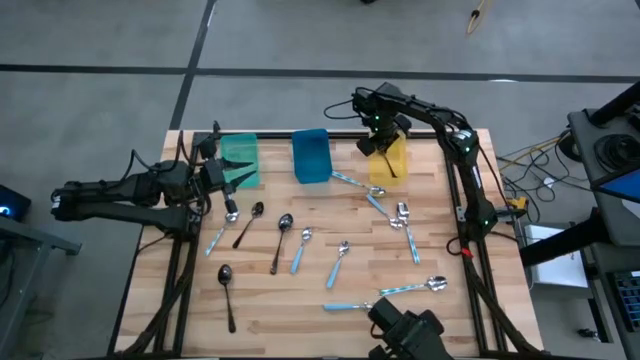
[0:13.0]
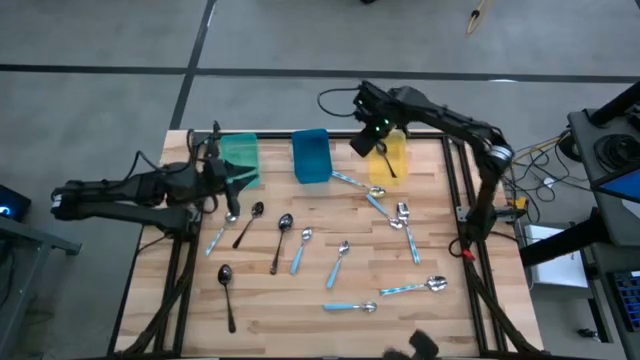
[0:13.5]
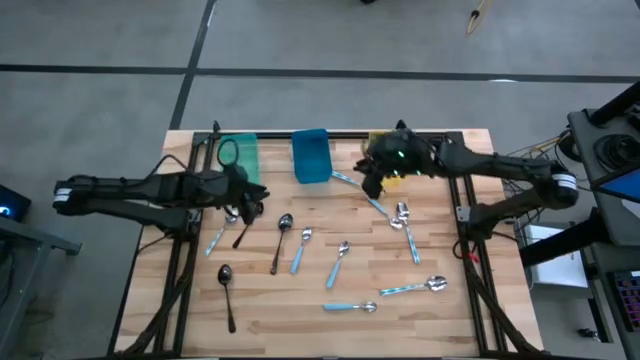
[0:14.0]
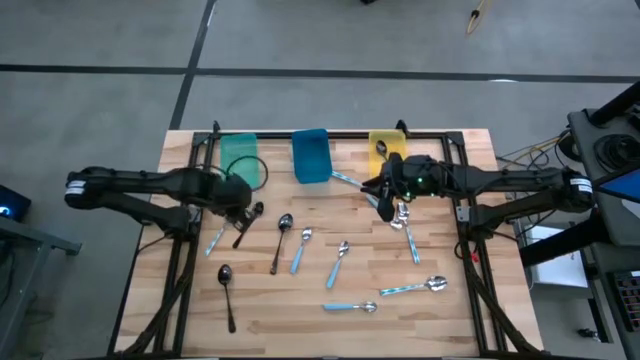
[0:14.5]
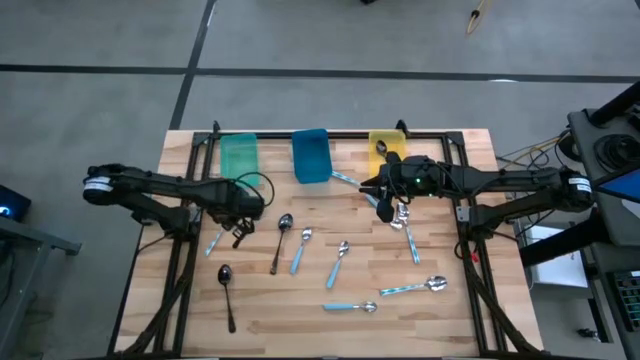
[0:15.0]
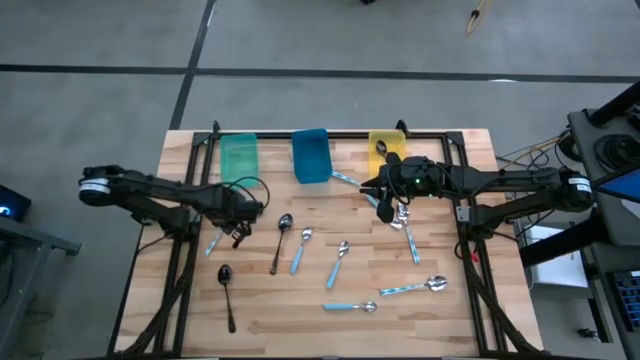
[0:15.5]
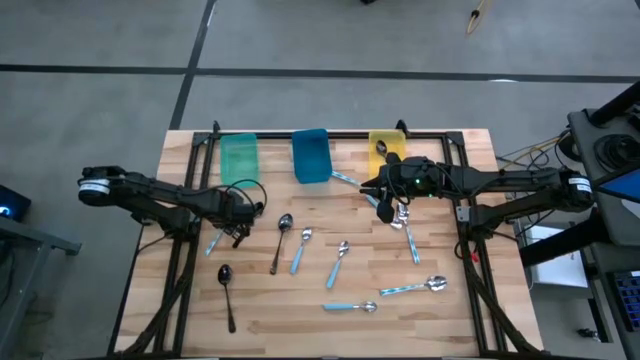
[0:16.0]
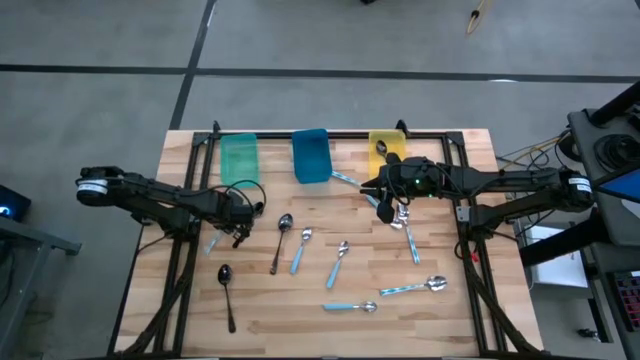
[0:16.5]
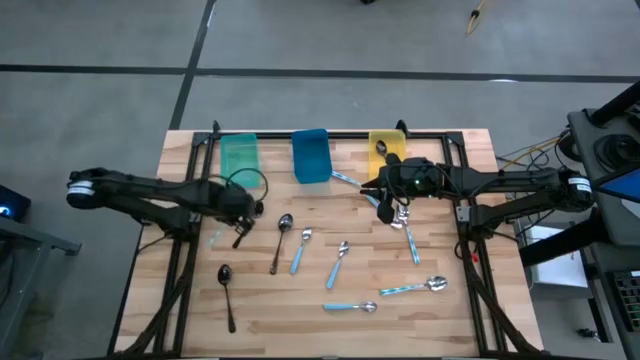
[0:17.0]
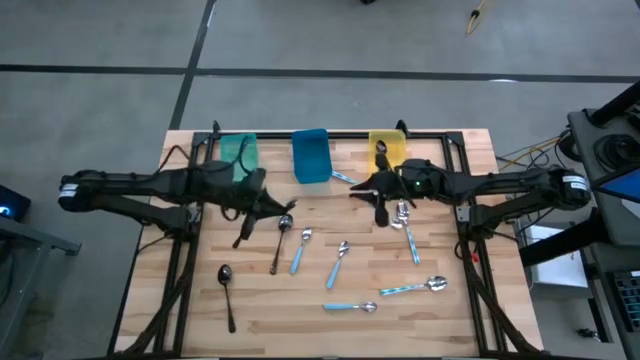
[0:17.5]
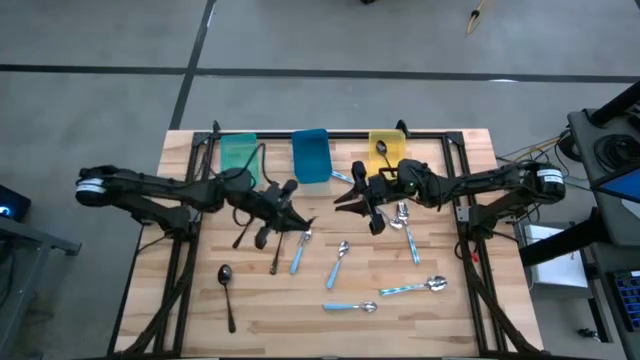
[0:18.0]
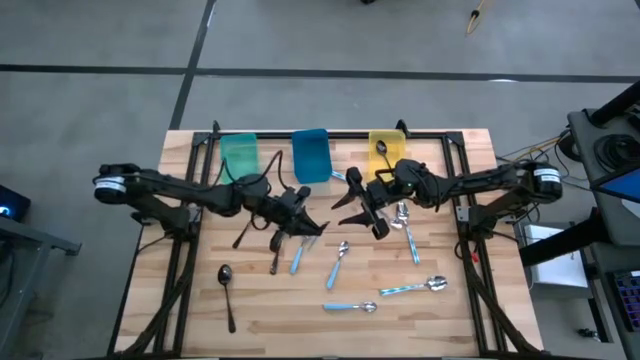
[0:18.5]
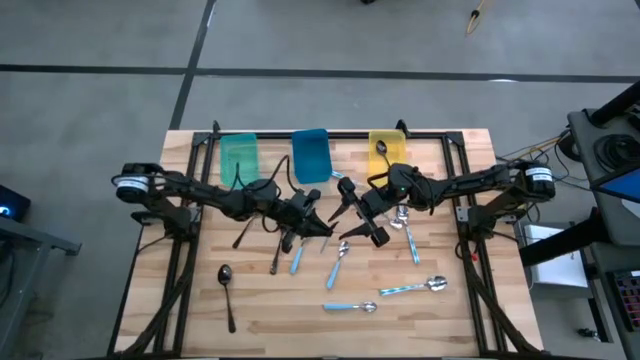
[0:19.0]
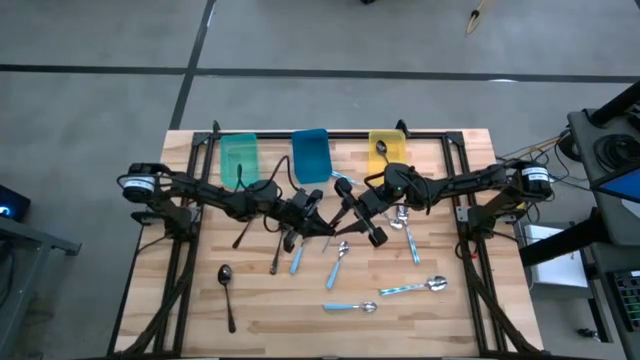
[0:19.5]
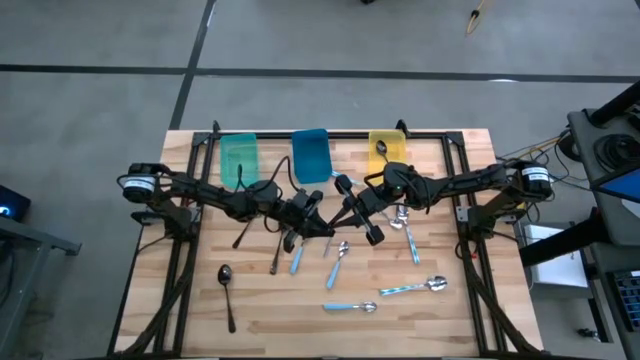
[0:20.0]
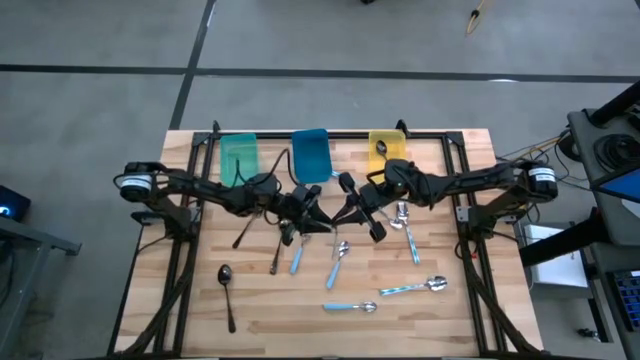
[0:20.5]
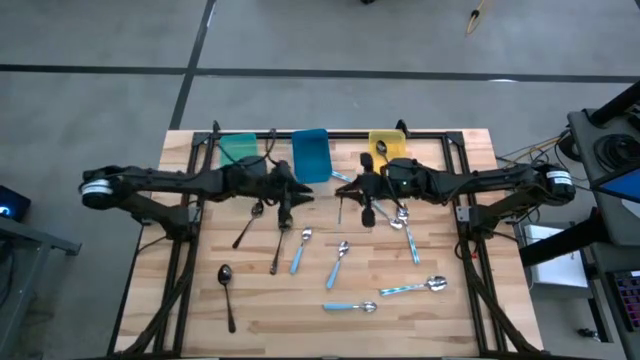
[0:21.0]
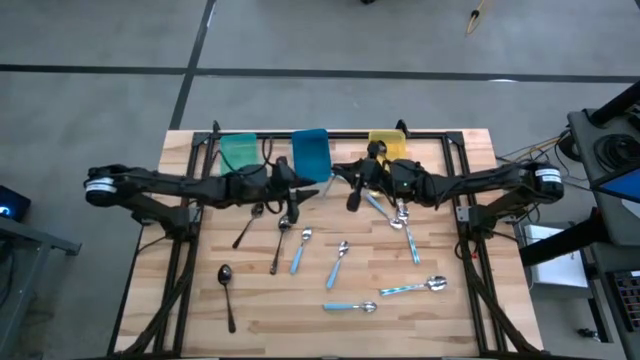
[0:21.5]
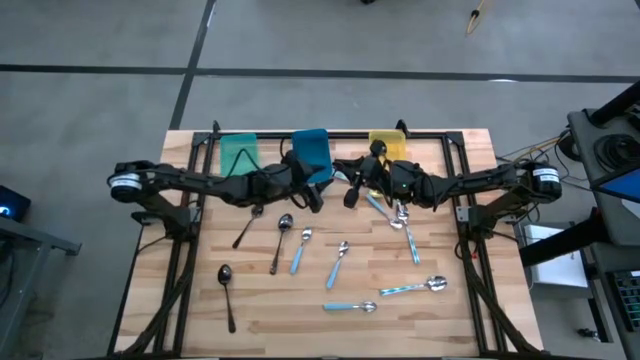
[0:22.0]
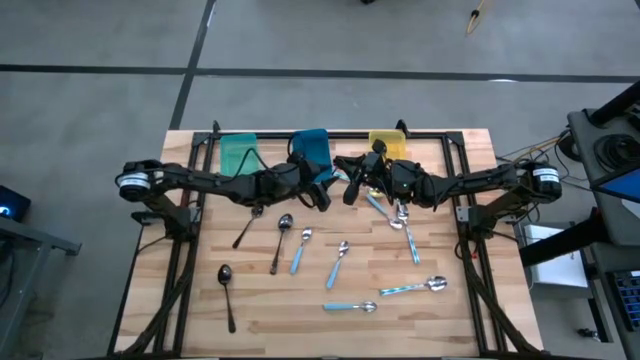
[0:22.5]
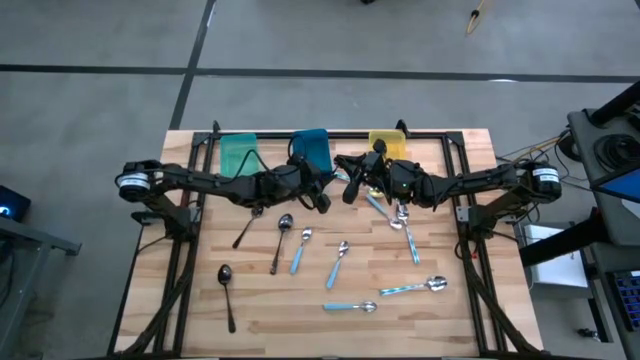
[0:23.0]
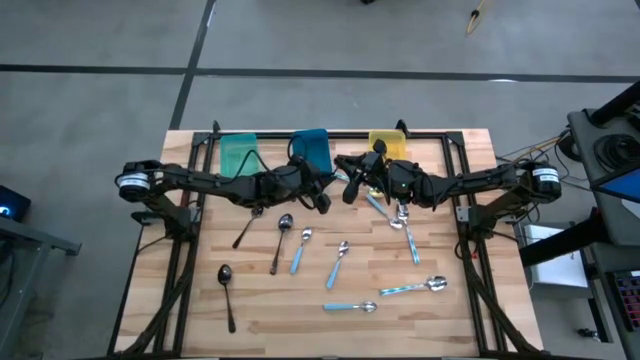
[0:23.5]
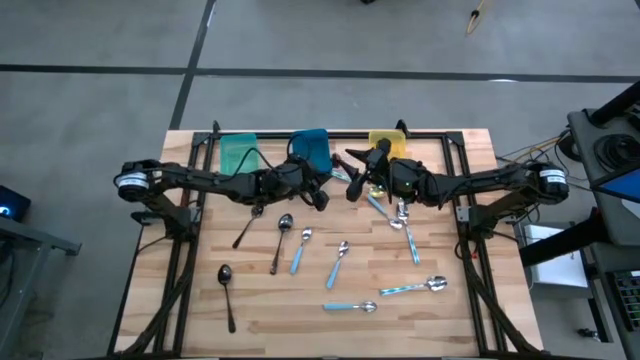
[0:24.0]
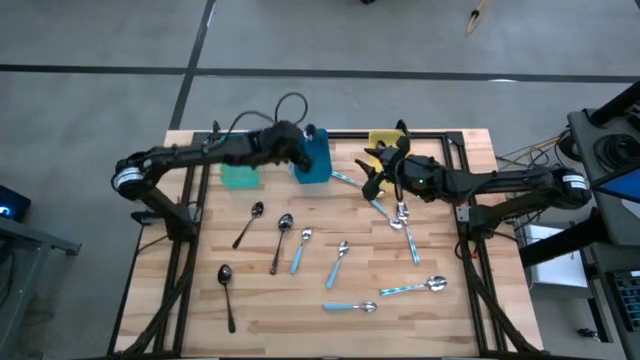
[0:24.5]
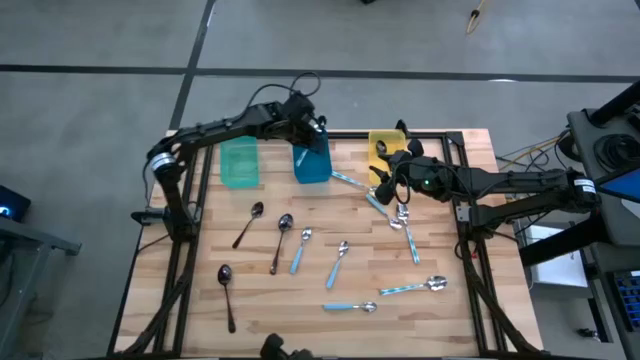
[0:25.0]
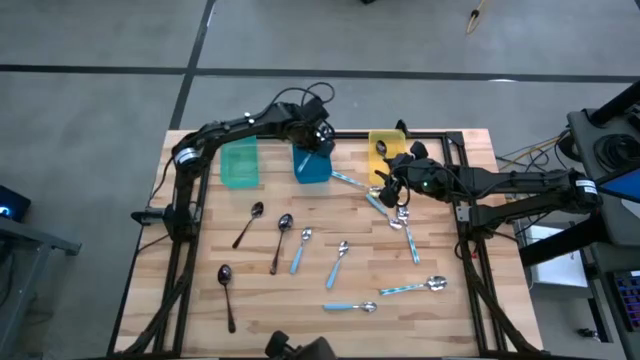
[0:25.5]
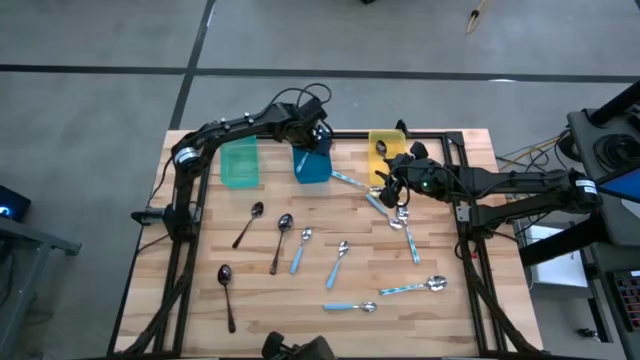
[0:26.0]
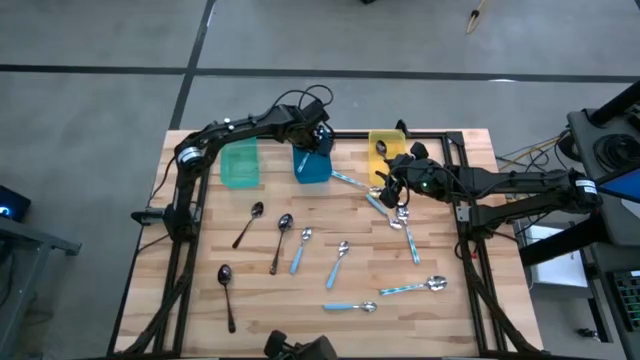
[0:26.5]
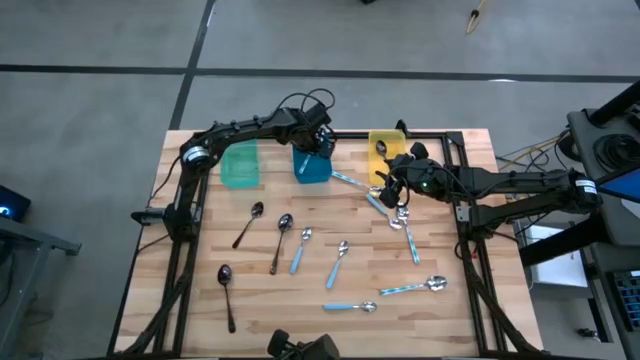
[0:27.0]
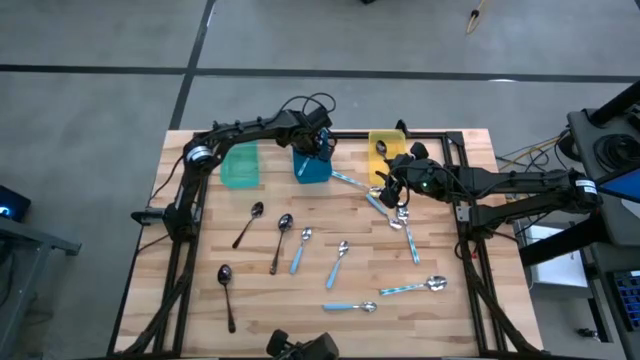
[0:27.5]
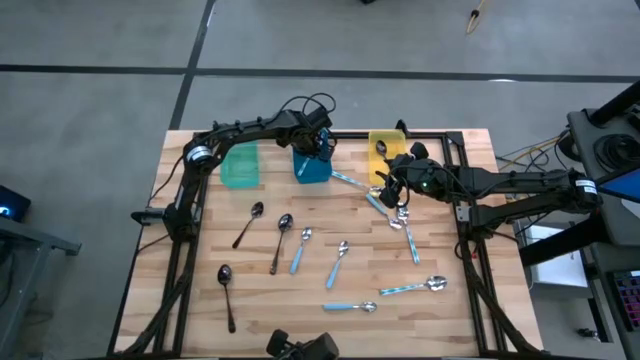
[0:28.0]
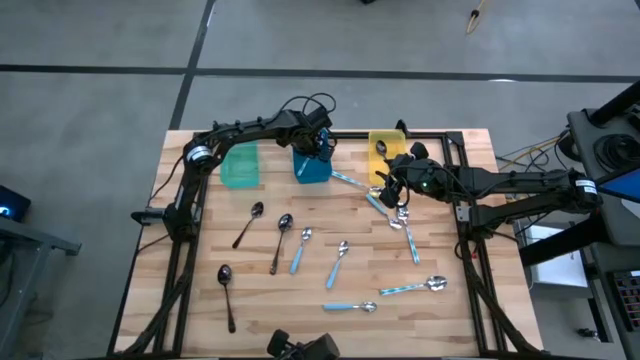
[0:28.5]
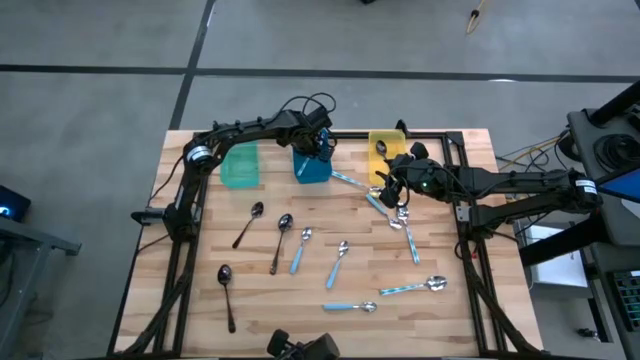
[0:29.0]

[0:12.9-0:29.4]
Task: Sort silverware by color (type)
Put the white-blue spoon into the blue bin

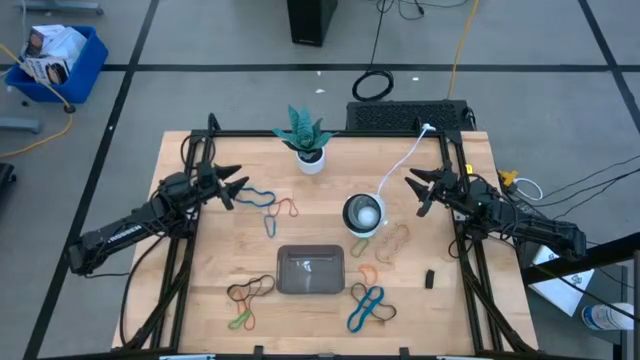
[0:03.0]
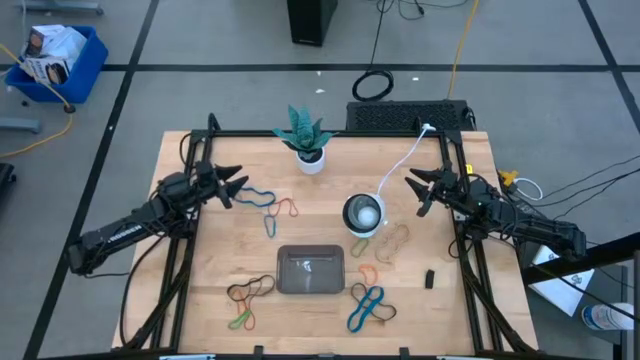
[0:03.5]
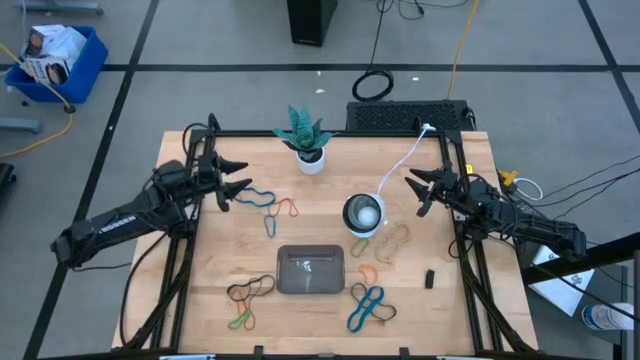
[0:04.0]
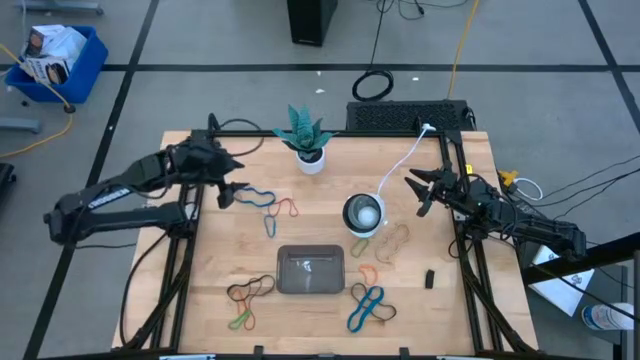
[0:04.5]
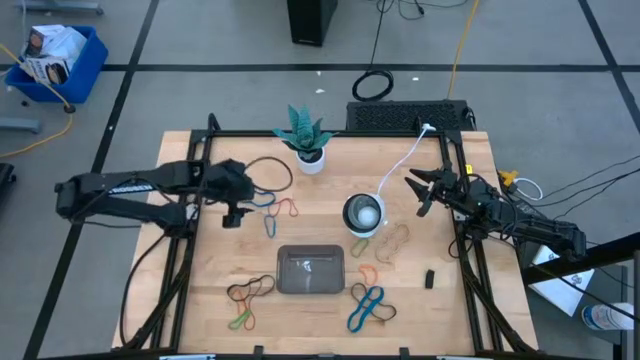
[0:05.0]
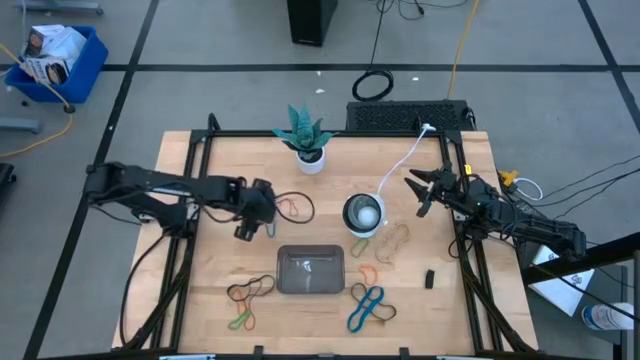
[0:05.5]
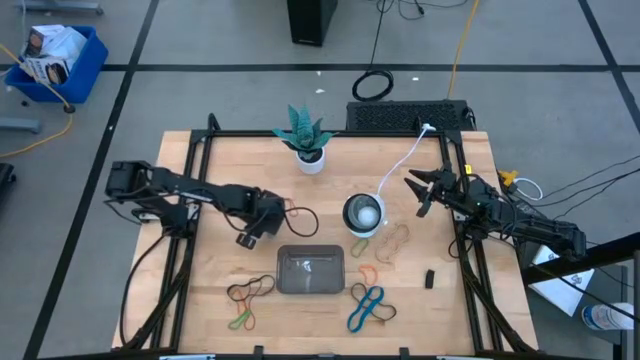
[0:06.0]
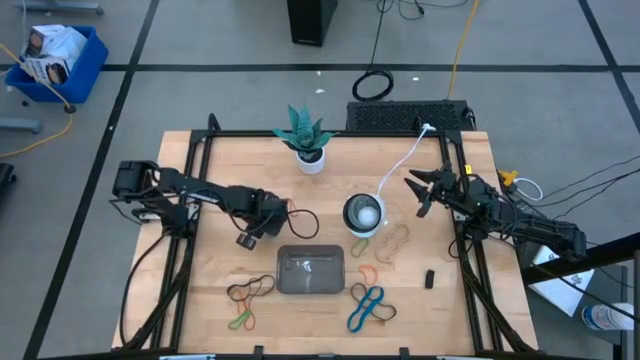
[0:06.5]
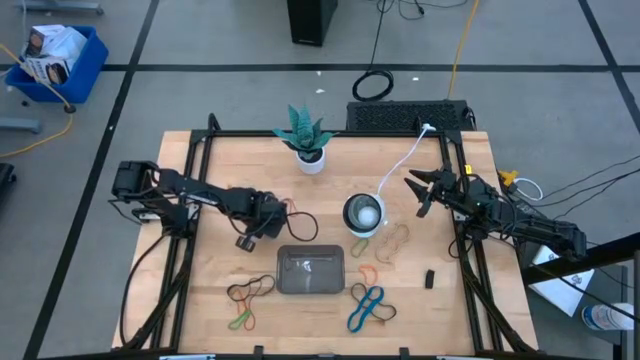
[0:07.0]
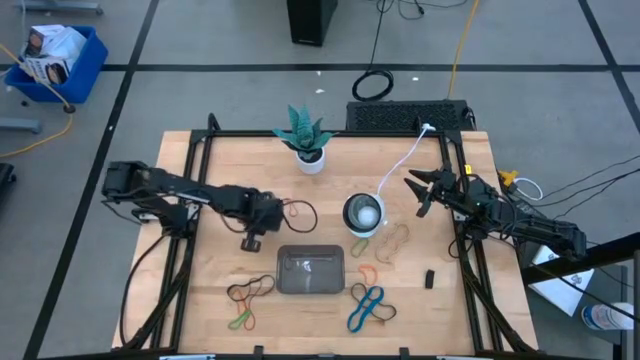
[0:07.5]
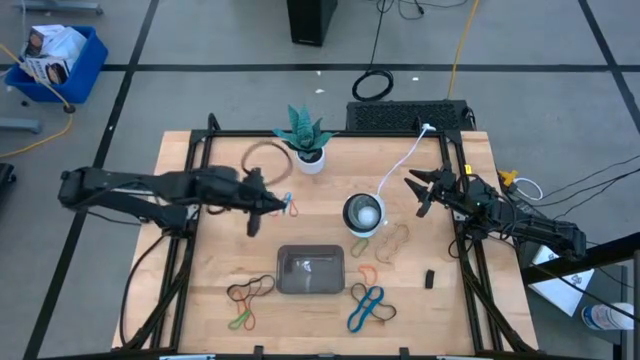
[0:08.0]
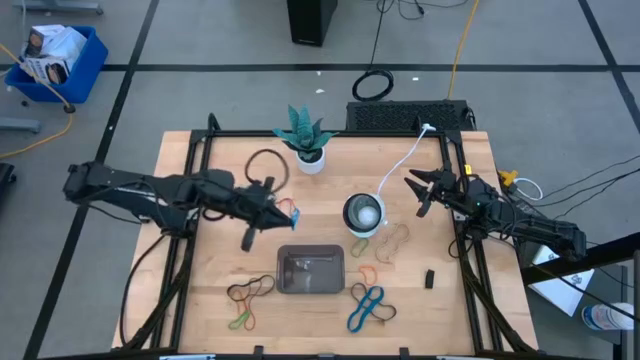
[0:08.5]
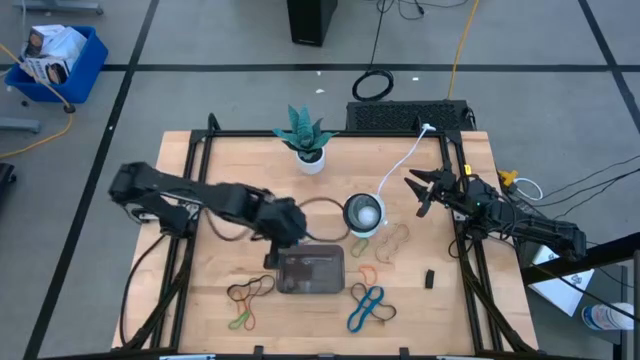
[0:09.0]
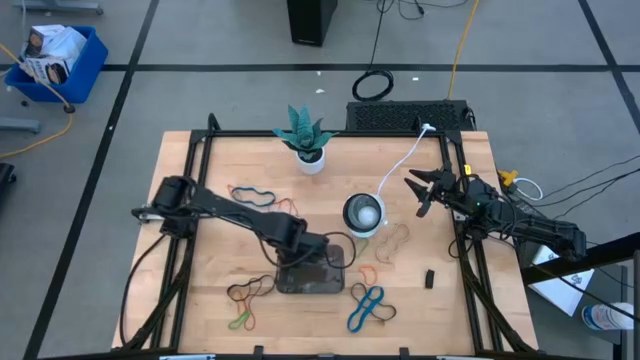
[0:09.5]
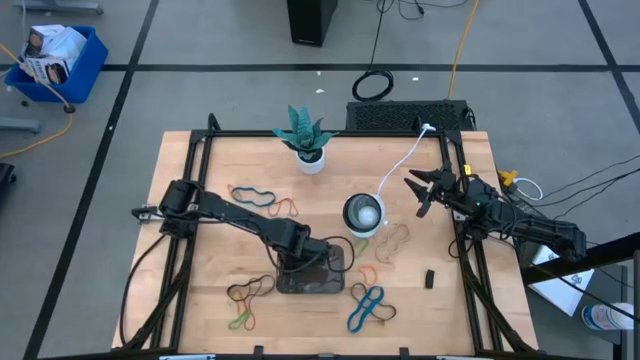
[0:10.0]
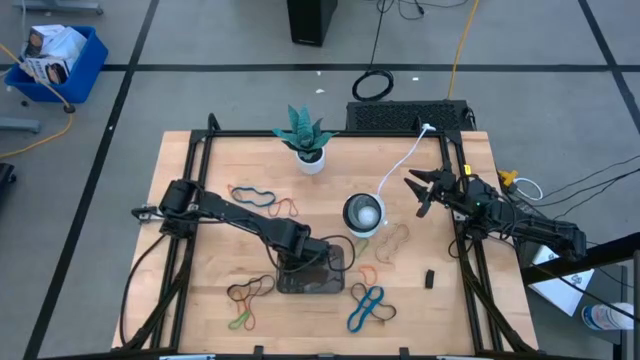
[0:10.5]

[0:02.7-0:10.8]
Task: Pick and place rubber bands into bin
Put the middle blue rubber band into the gray bin
